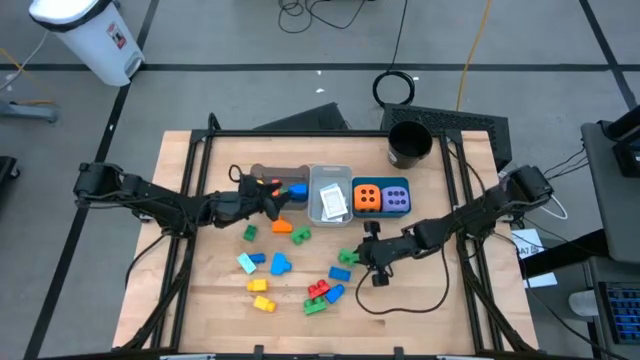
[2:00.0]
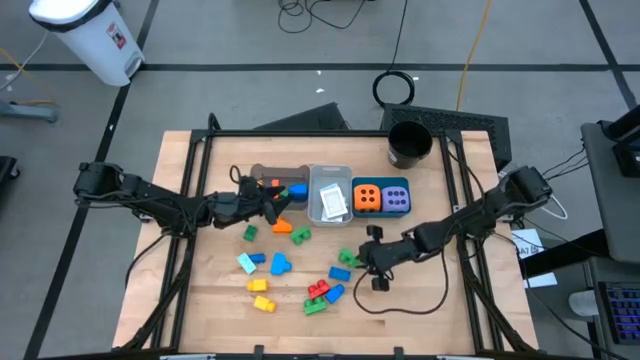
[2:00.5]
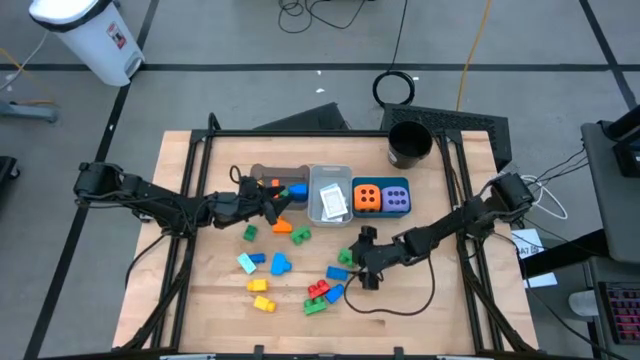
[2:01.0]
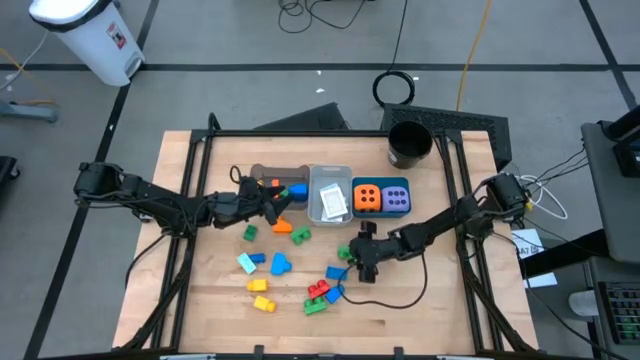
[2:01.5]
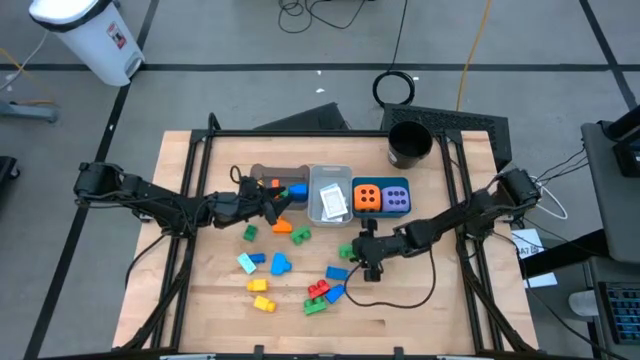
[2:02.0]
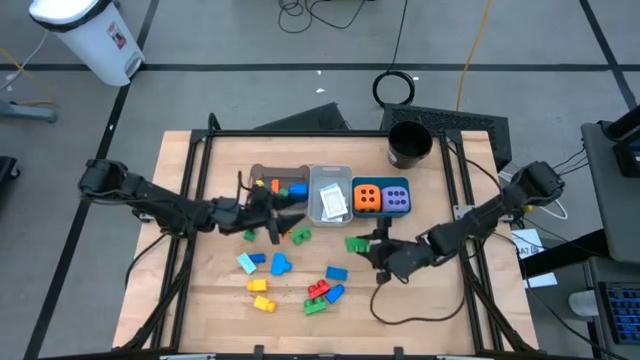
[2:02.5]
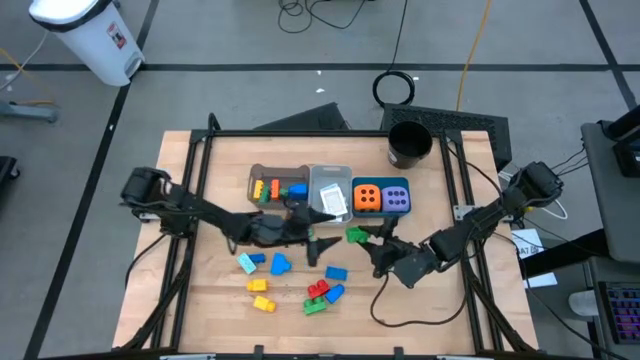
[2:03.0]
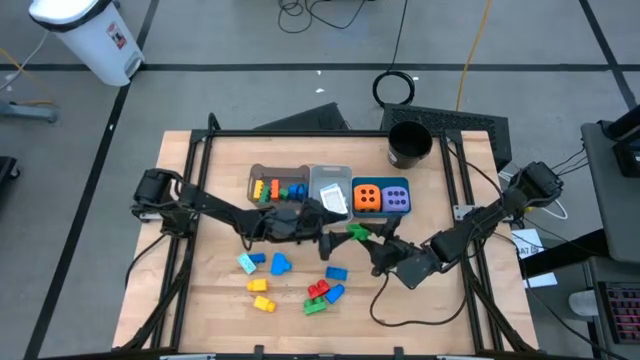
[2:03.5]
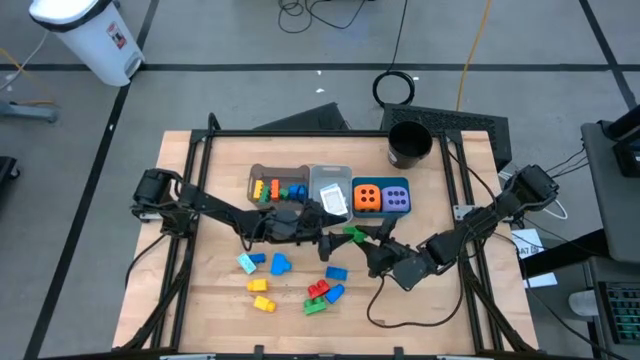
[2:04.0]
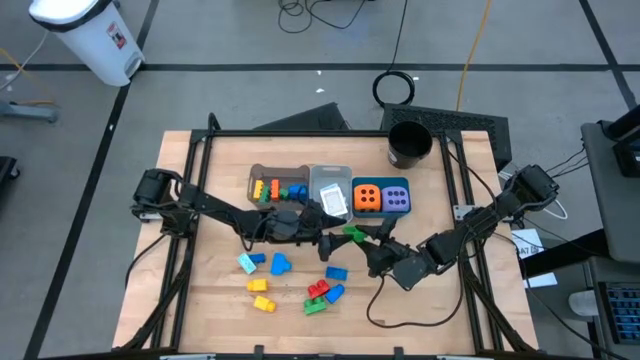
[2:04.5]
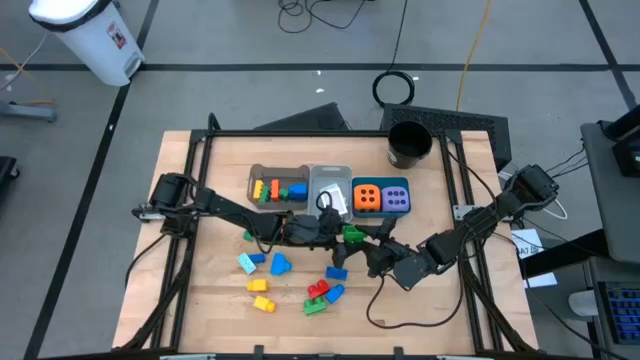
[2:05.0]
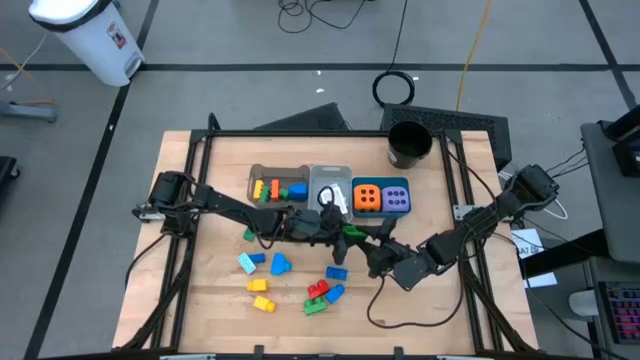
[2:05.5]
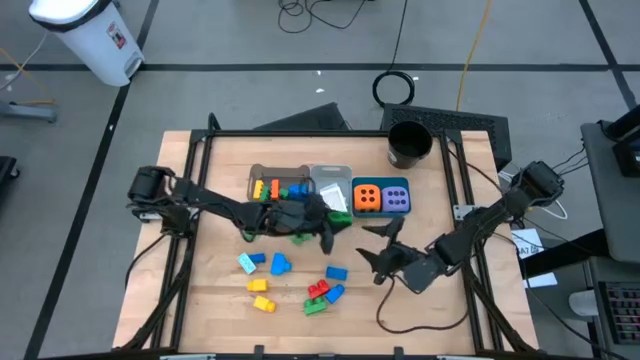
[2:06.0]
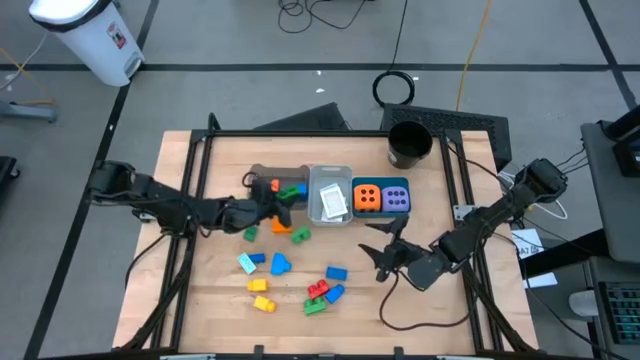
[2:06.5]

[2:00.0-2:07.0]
Task: Pick & Place Toys
Put the green game piece into the black bin

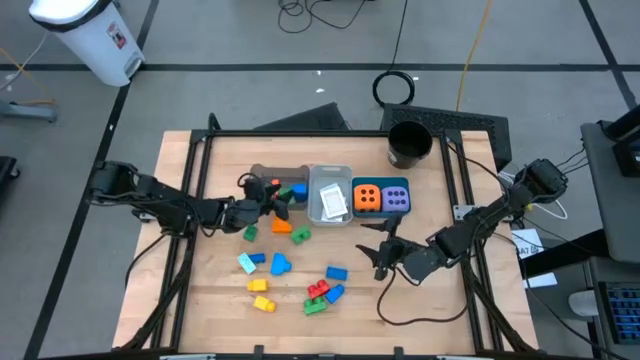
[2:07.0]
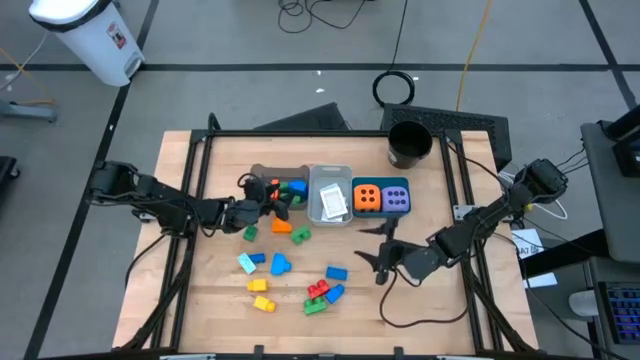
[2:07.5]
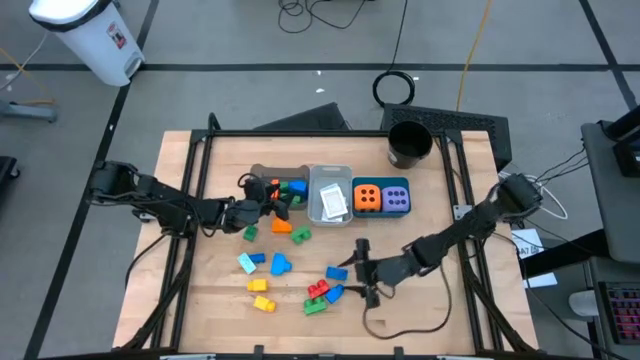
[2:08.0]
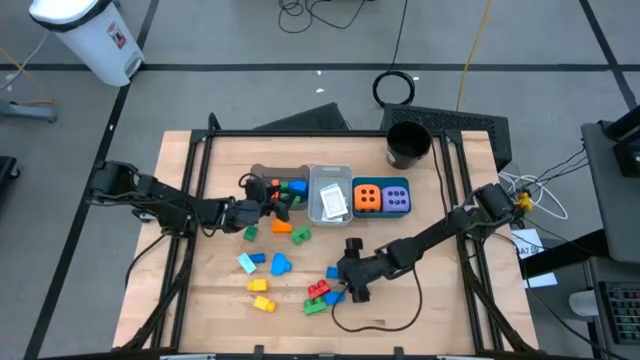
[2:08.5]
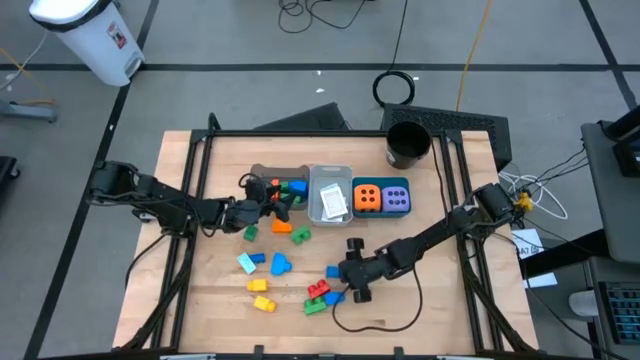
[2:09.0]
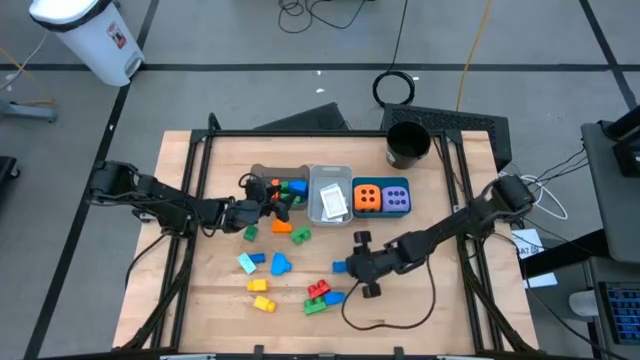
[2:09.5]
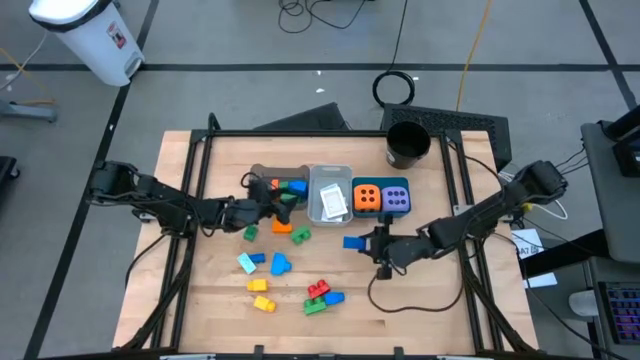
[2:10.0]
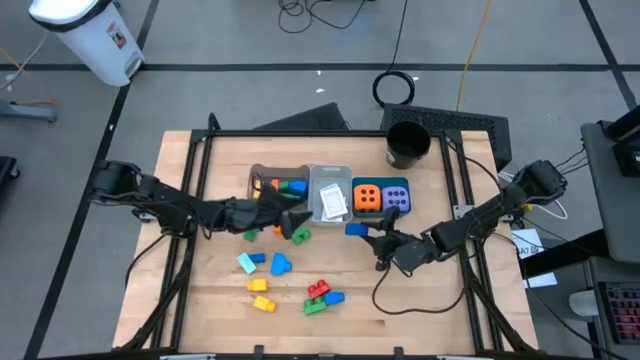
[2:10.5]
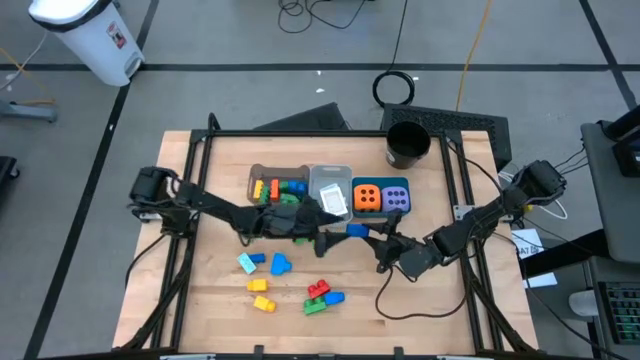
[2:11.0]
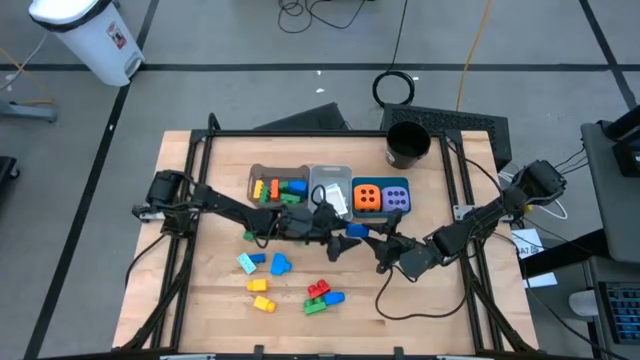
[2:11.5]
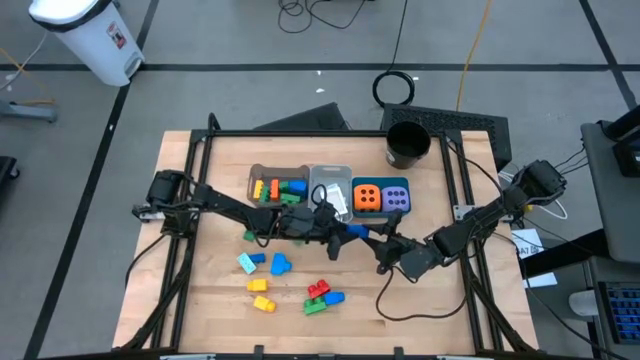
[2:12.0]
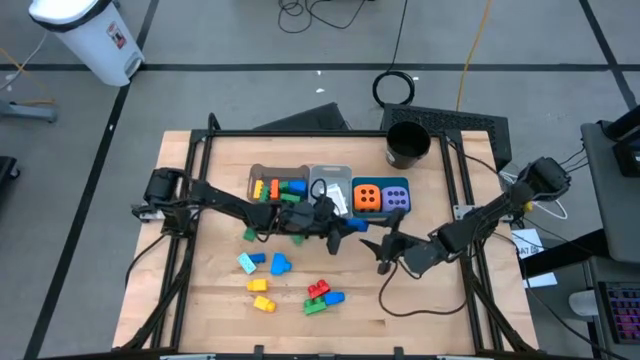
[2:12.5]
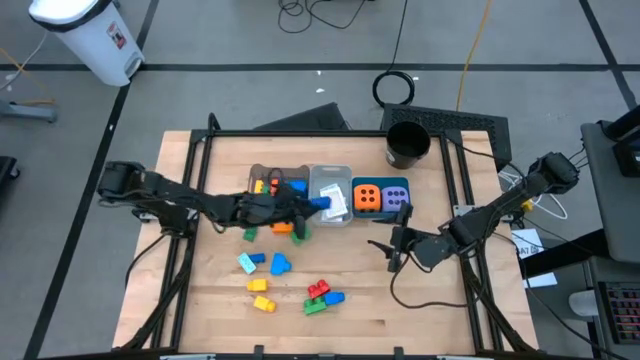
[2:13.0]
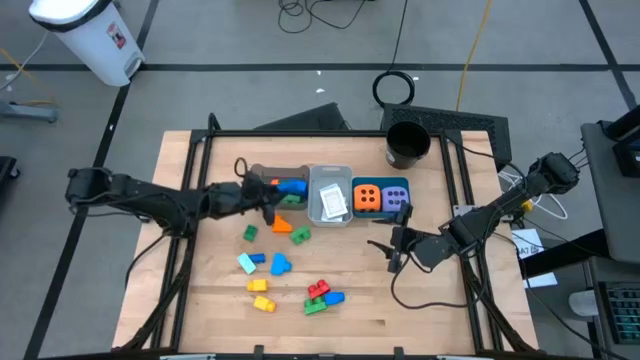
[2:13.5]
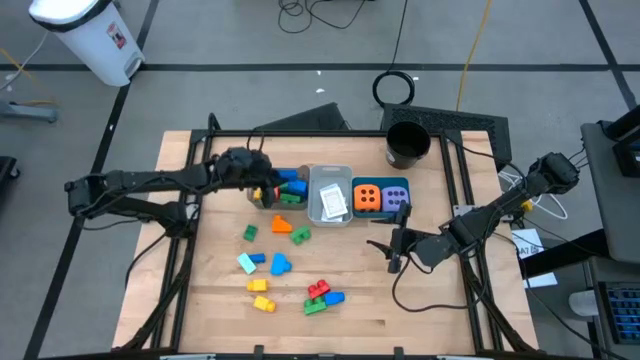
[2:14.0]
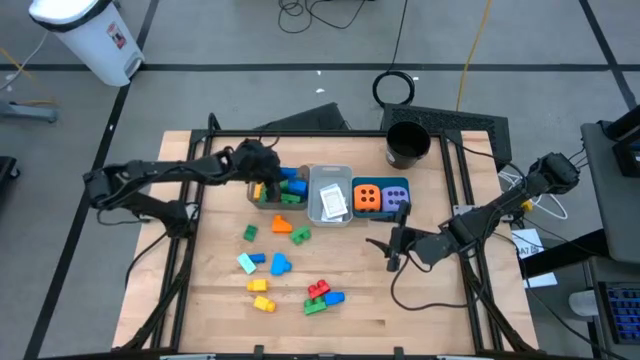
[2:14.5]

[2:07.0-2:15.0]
Put the blue game piece into the black bin

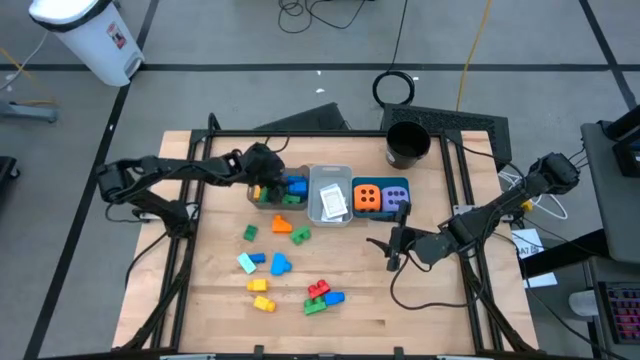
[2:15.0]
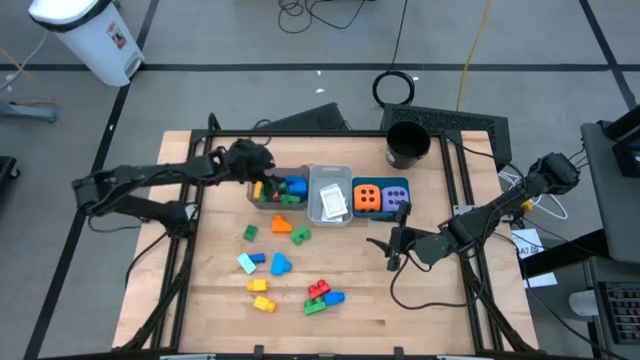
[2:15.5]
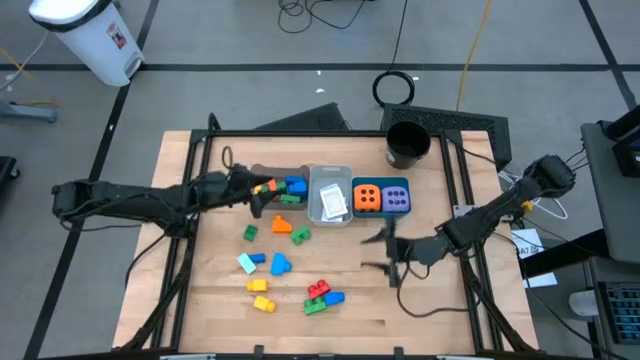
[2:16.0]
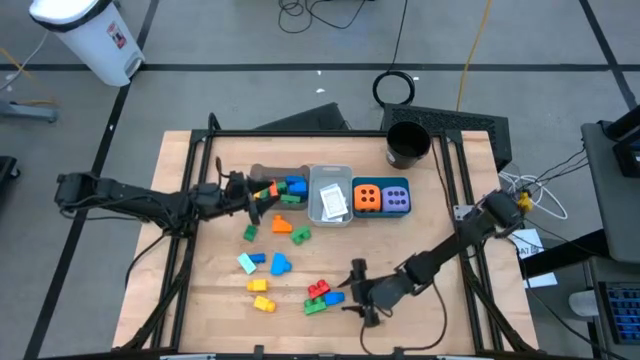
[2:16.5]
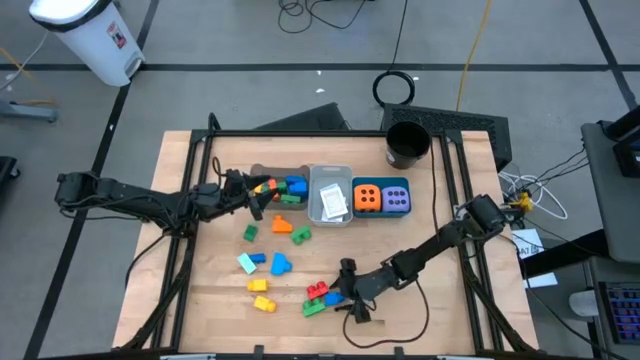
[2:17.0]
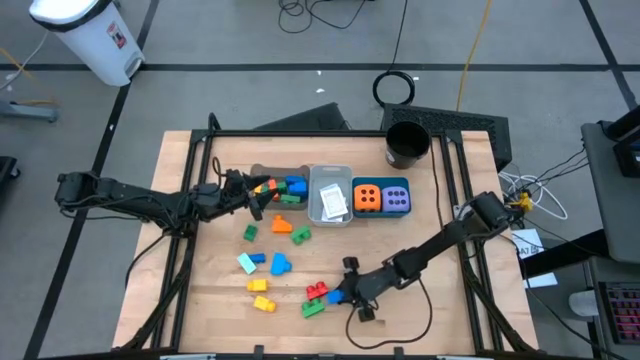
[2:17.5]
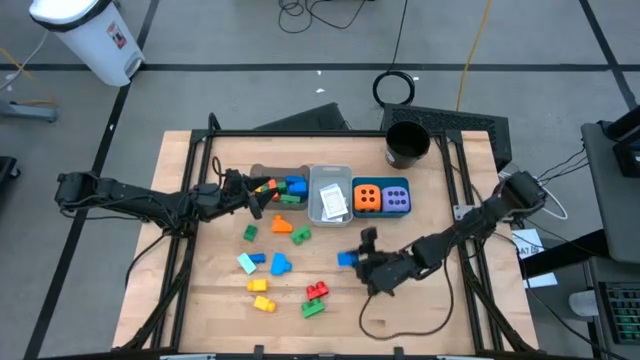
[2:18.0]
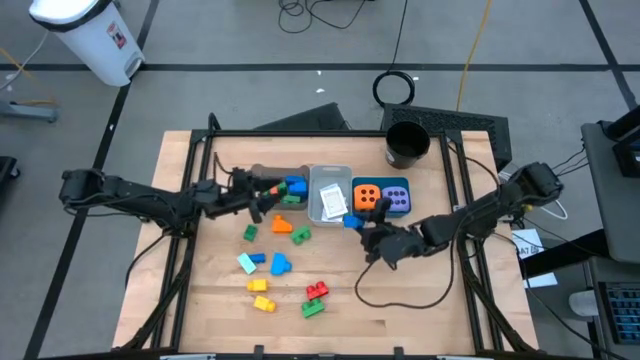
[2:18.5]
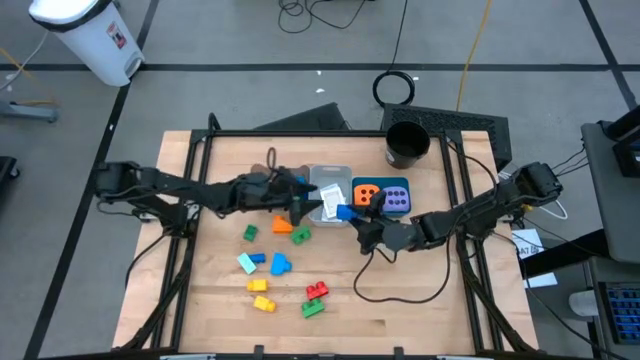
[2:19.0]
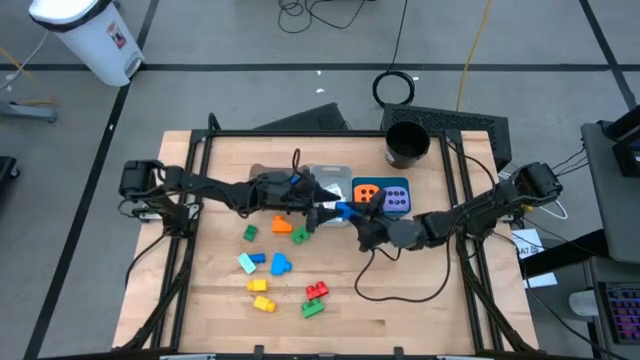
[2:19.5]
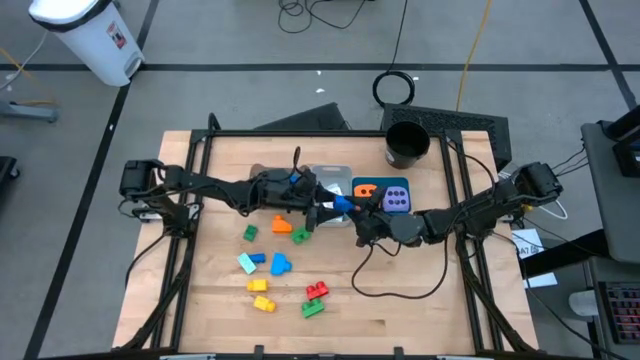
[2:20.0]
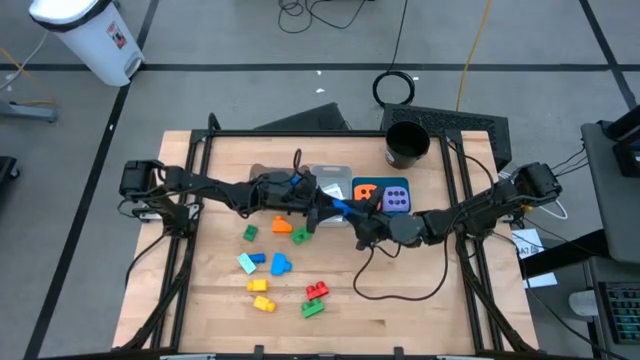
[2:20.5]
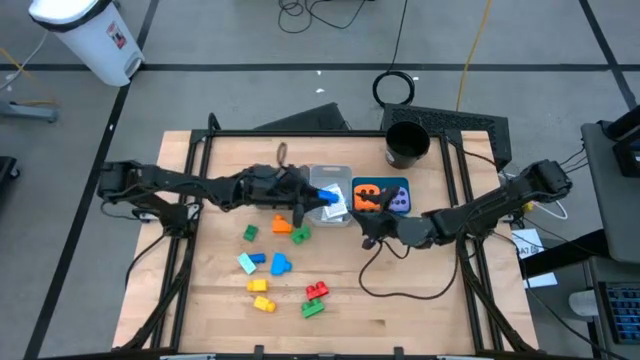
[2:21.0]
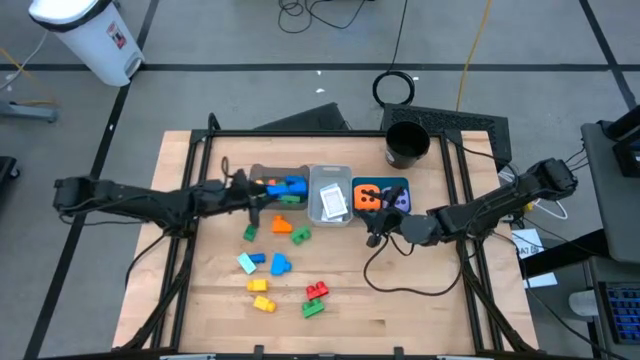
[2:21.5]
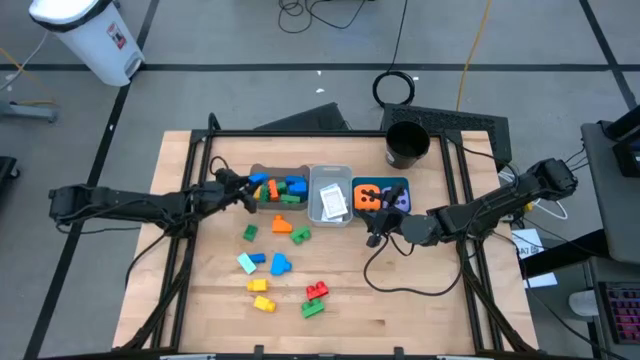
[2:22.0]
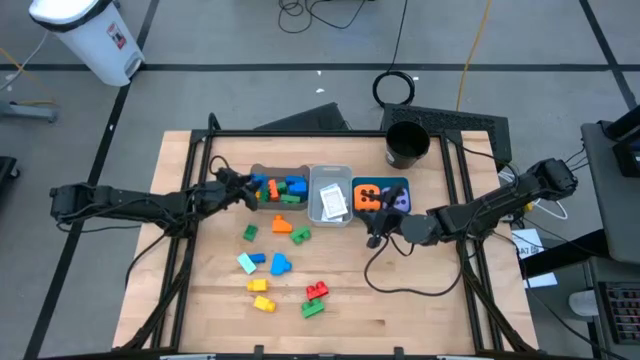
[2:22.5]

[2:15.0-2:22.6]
Put the blue game piece into the black bin
